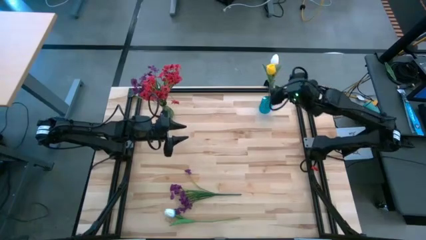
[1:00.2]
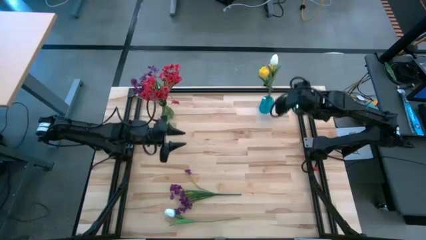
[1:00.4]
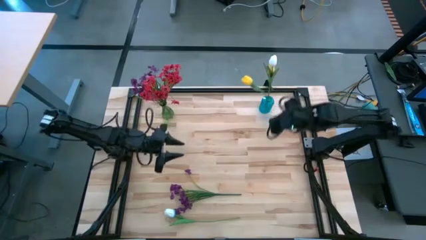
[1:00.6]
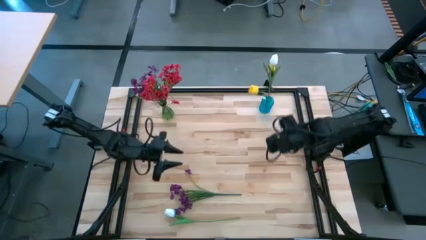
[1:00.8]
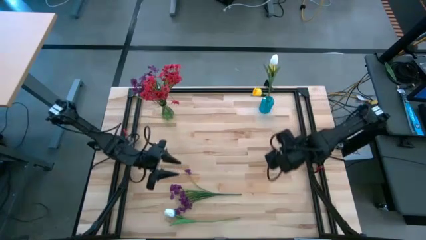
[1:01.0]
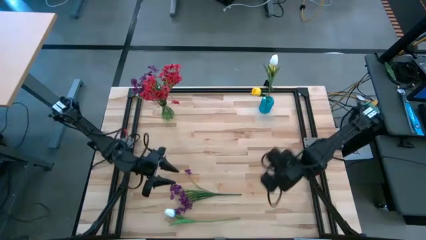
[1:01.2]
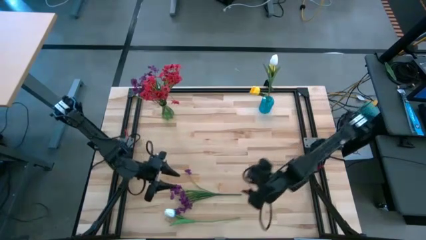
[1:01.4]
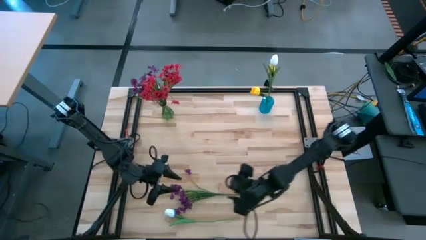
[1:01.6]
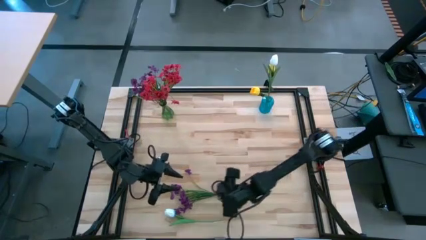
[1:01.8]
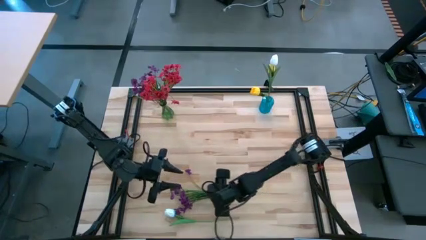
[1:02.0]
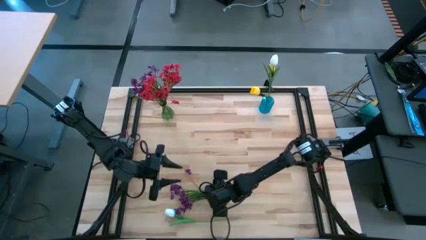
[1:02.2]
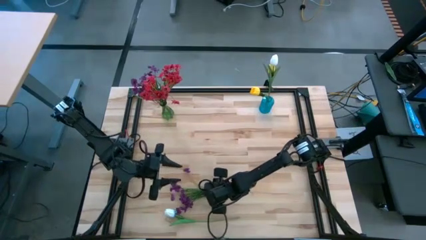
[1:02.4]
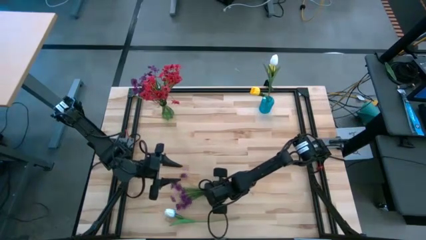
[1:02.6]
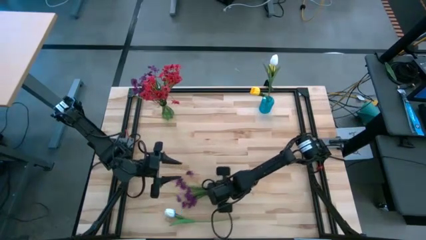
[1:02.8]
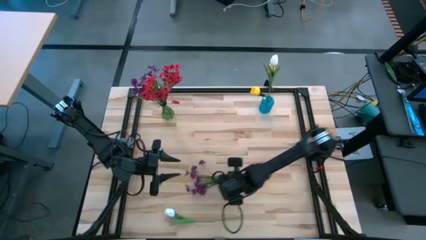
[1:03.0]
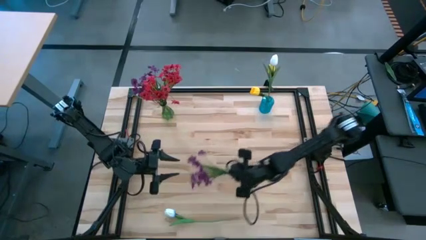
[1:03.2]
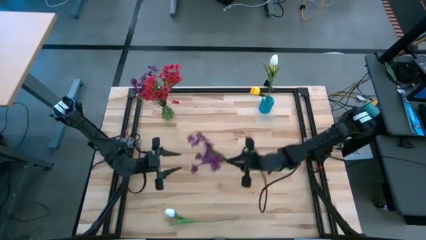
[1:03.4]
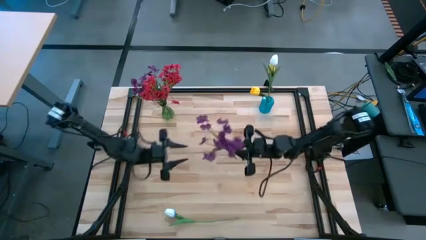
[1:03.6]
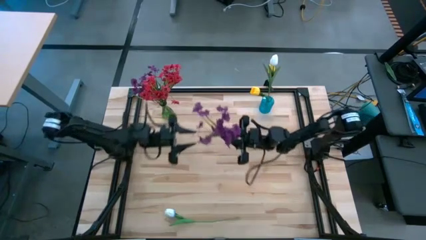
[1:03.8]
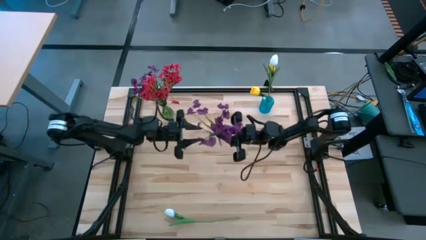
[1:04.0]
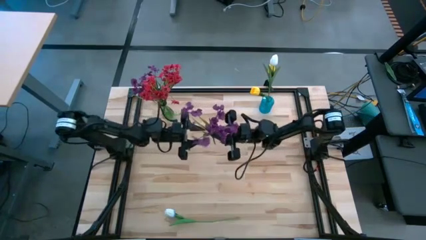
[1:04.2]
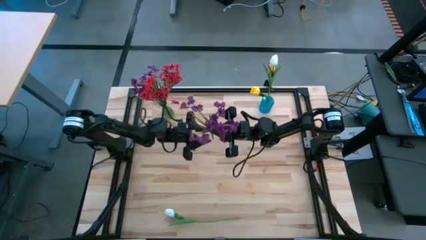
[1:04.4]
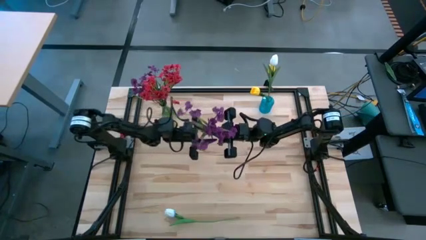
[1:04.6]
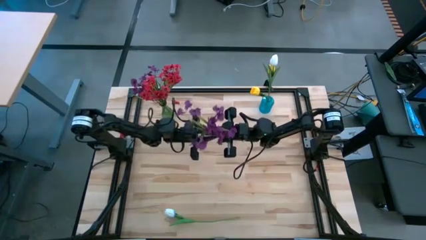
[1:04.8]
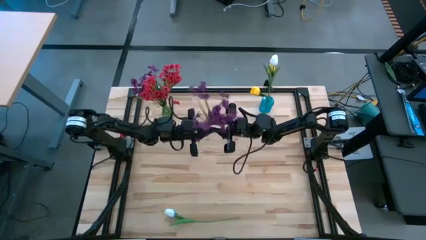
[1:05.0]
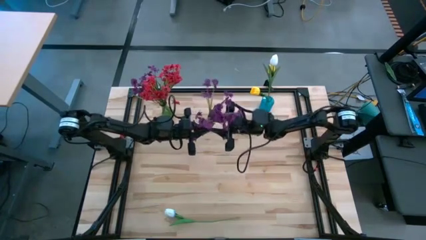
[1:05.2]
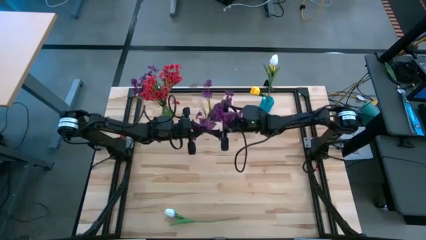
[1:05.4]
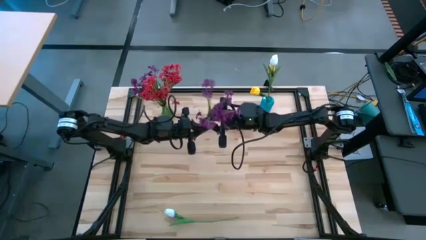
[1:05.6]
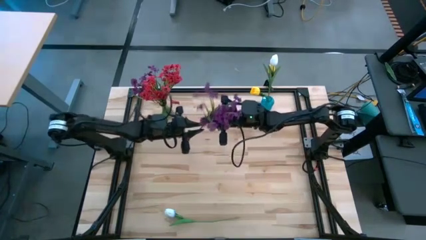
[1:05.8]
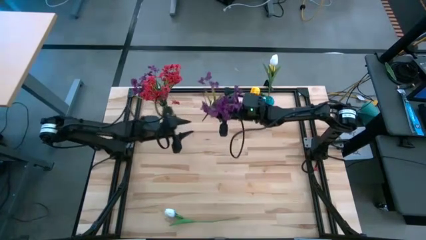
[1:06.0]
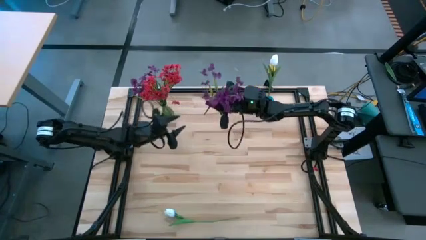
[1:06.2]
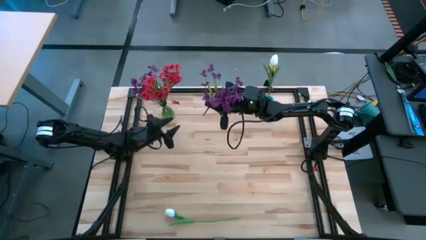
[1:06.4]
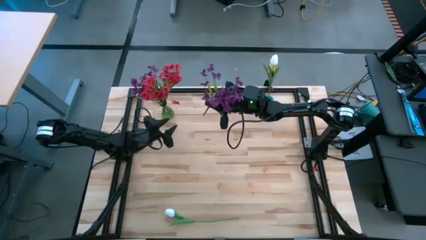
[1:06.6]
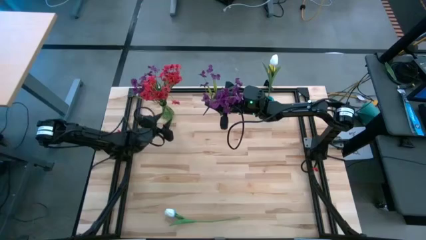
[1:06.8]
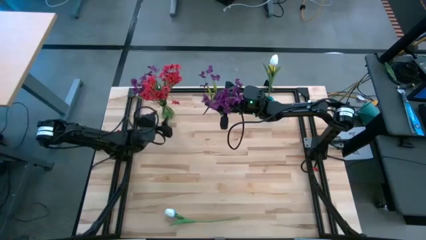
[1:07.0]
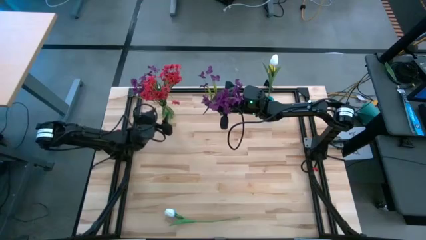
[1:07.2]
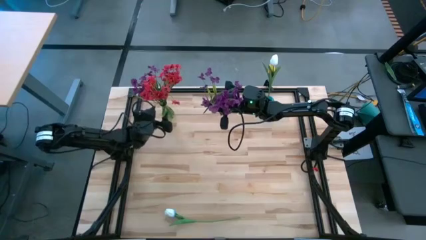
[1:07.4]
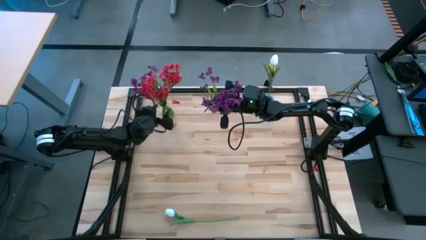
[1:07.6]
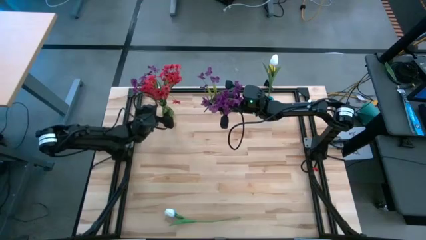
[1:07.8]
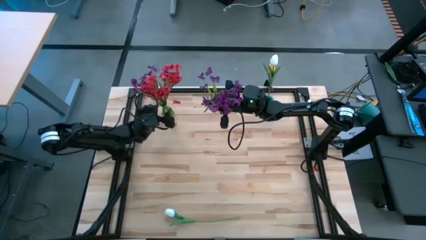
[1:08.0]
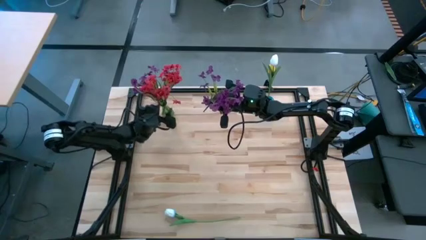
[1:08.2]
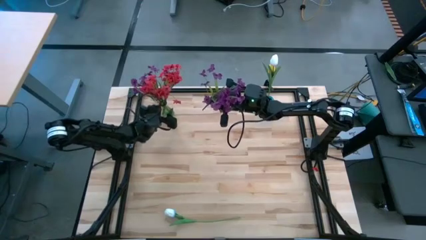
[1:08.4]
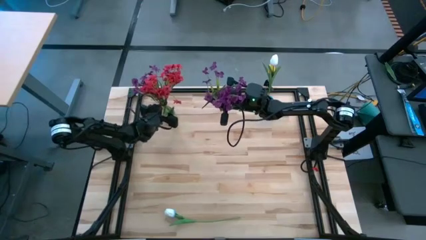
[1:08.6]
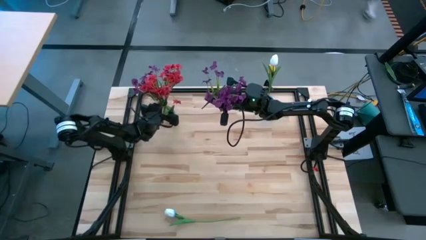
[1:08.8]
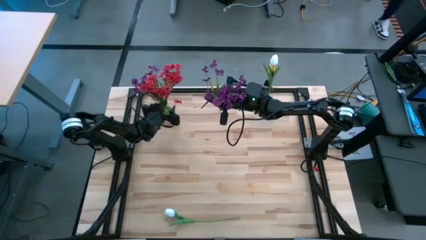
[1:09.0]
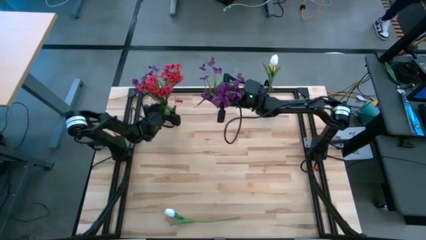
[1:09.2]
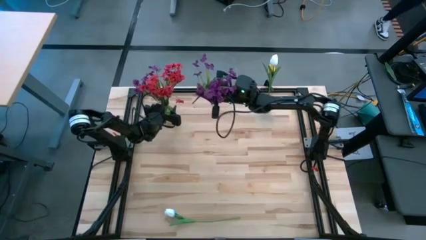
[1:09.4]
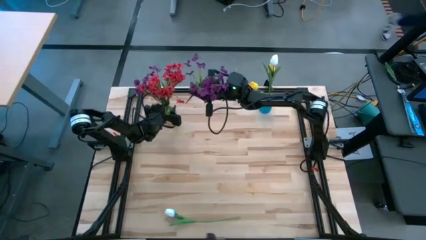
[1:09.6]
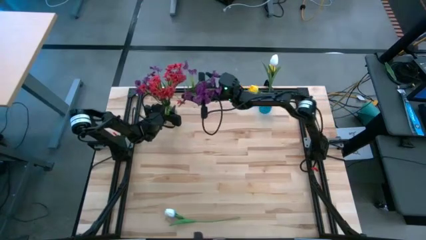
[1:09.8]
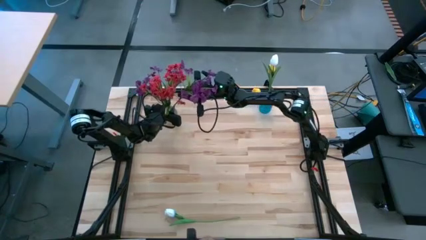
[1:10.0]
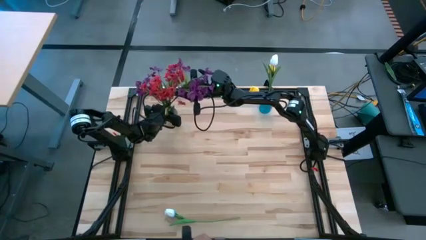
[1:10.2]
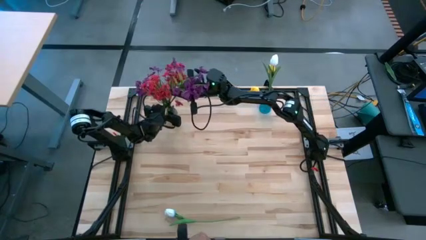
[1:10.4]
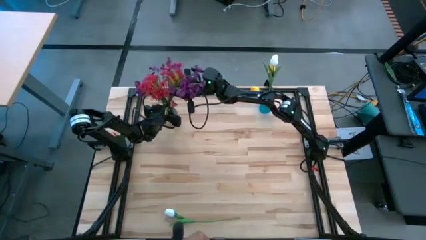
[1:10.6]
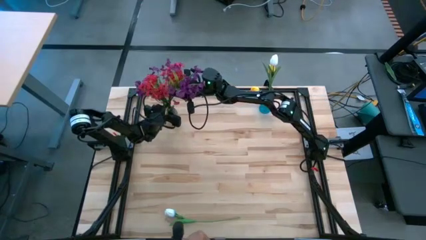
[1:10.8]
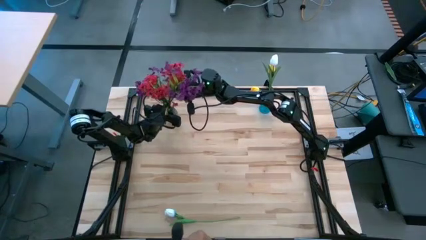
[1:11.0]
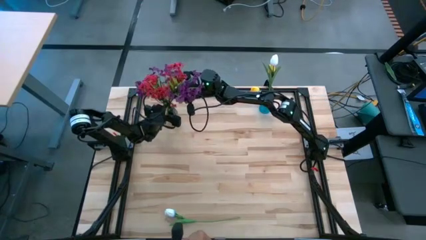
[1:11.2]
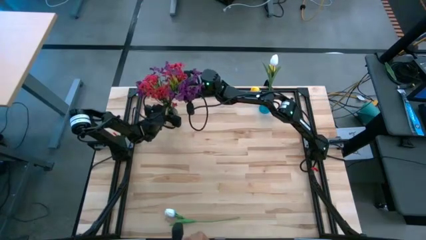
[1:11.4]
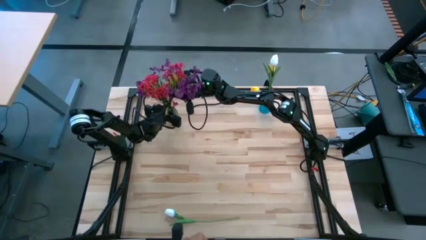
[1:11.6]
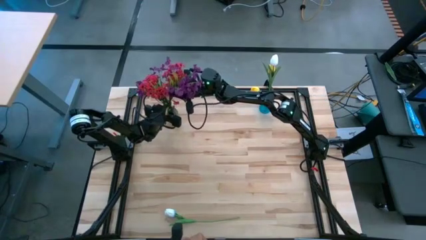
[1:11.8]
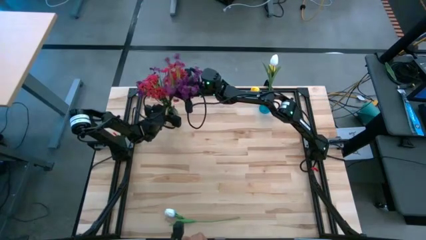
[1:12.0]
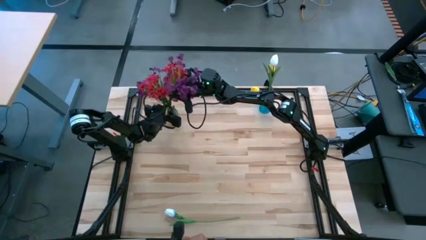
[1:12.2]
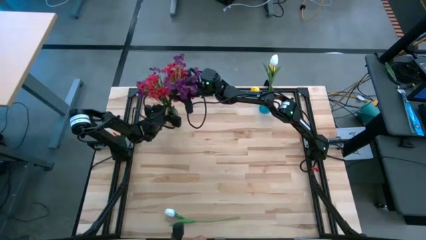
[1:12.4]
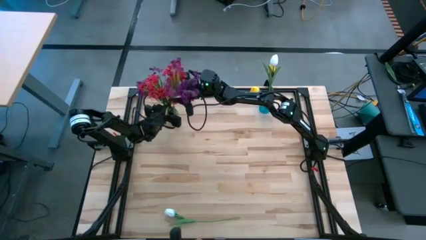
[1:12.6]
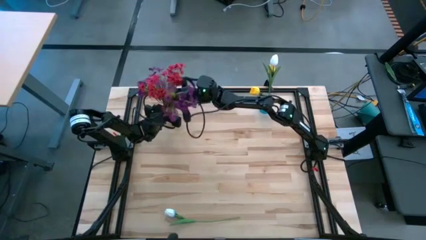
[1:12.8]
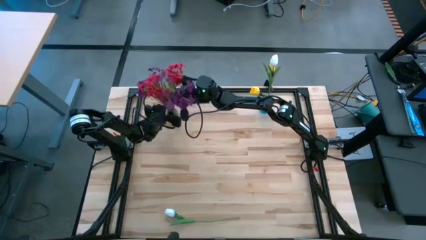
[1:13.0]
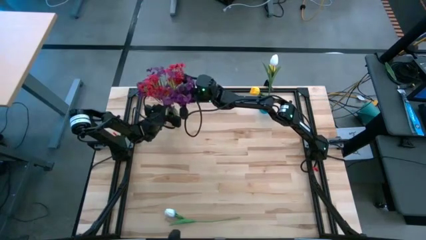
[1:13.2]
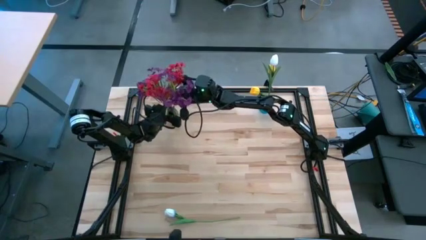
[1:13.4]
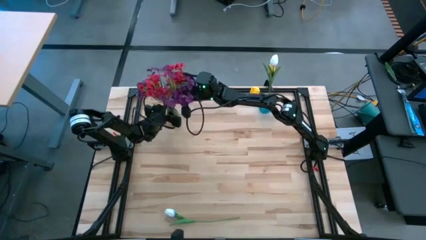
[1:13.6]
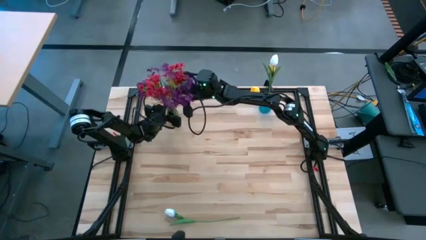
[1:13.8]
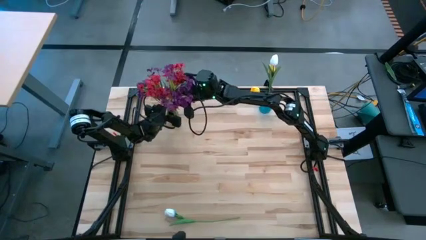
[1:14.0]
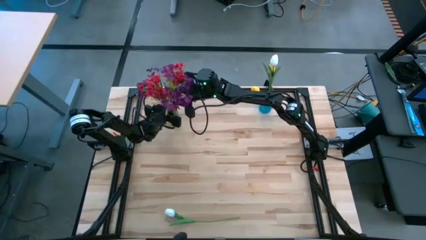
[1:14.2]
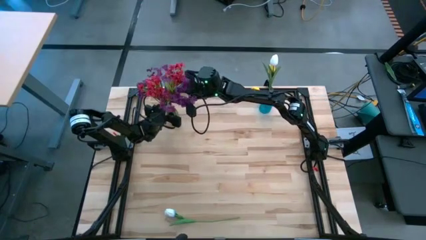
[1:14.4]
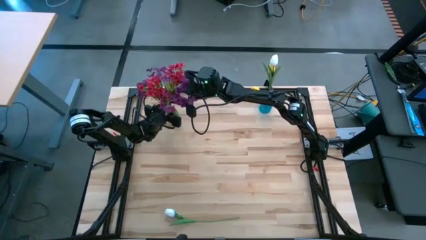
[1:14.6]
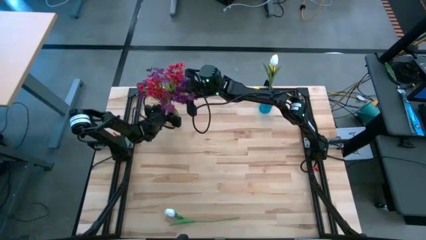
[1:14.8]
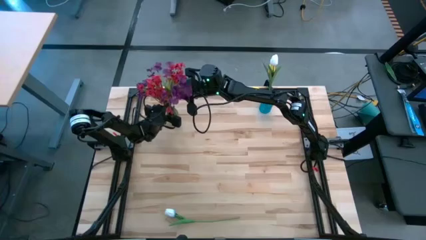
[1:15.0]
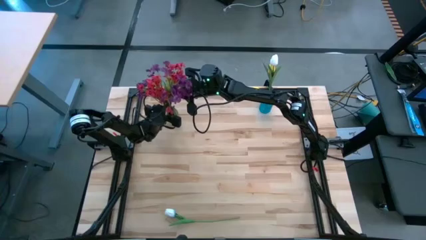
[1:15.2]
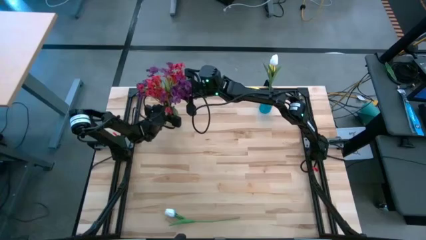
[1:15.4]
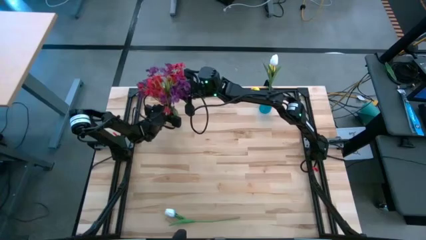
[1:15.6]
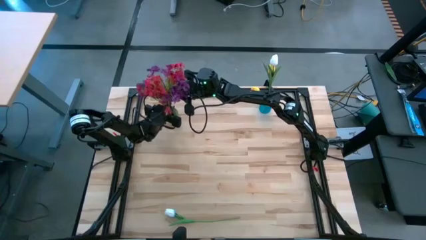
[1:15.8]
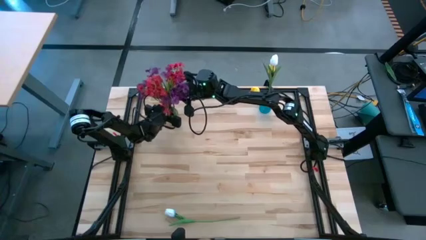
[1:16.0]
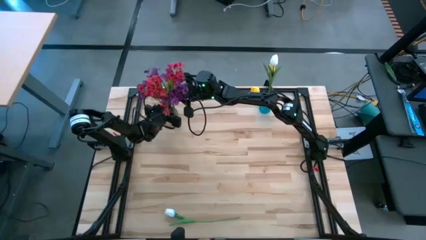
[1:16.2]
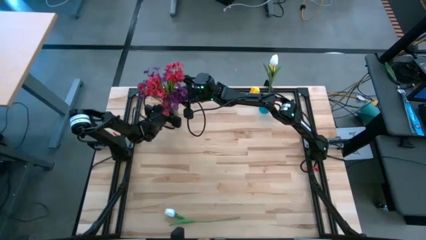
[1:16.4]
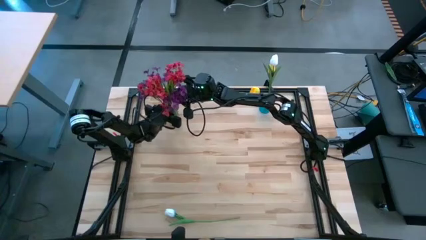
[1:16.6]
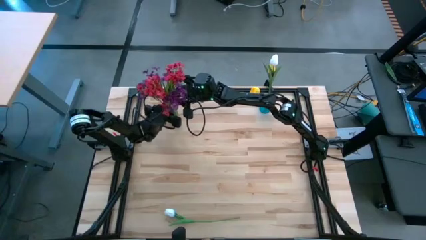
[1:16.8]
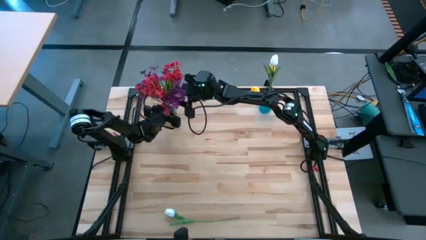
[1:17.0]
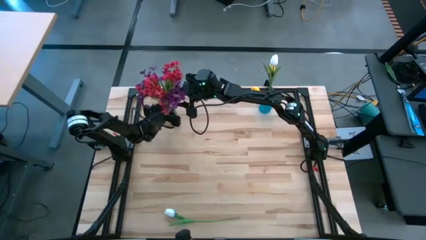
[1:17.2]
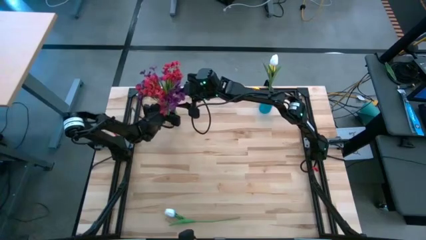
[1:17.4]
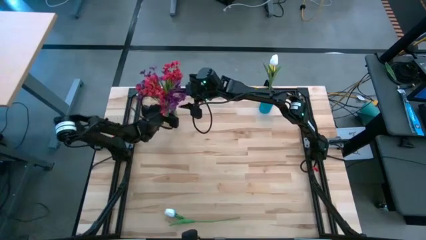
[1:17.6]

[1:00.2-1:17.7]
Task: Sort flowers into vase by color
Put the violet flowers into the green vase
